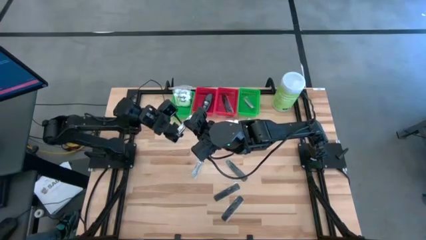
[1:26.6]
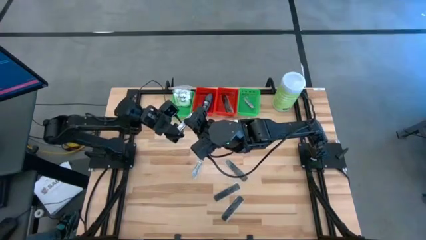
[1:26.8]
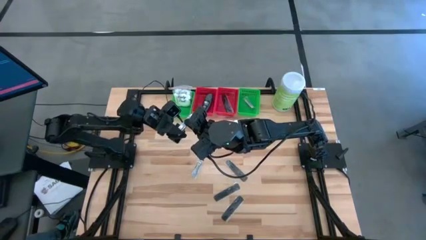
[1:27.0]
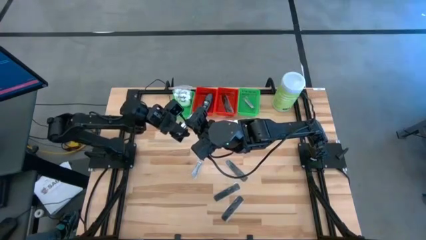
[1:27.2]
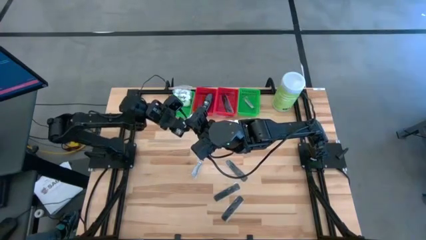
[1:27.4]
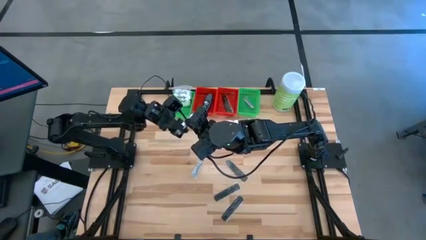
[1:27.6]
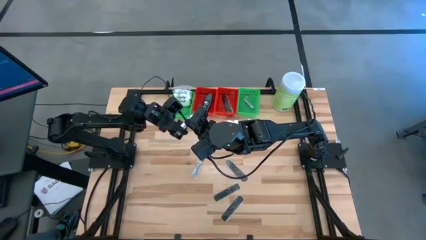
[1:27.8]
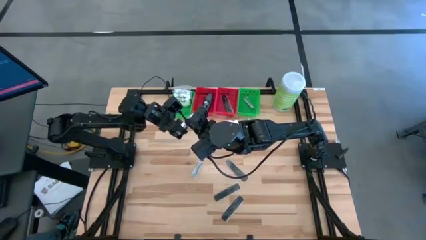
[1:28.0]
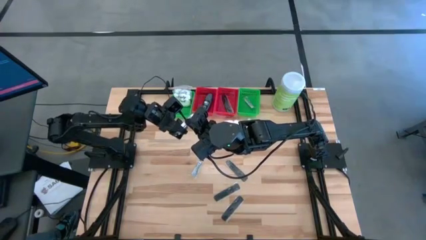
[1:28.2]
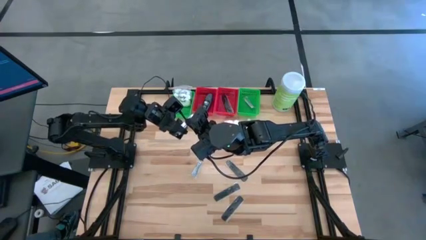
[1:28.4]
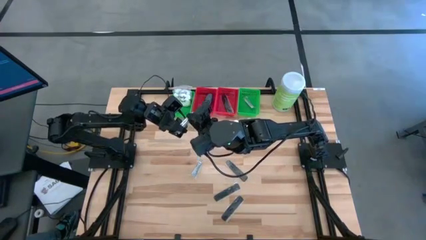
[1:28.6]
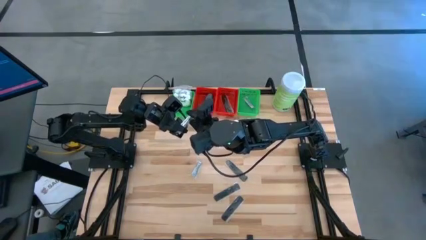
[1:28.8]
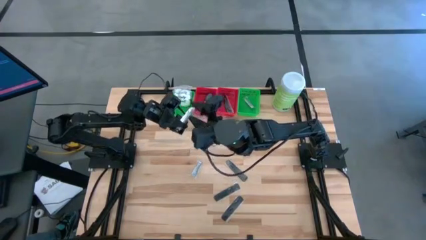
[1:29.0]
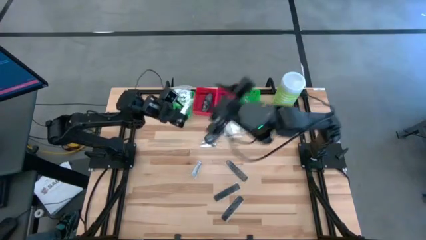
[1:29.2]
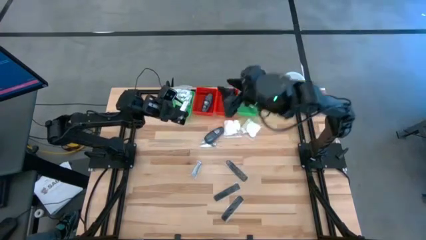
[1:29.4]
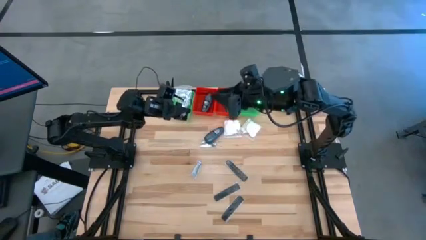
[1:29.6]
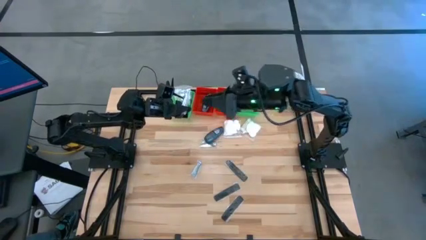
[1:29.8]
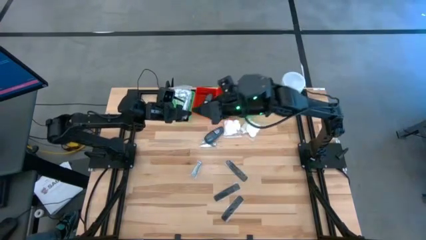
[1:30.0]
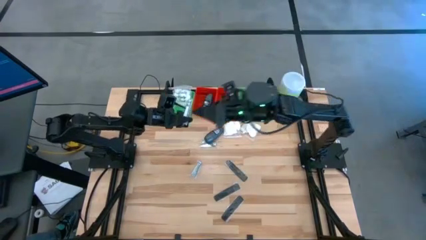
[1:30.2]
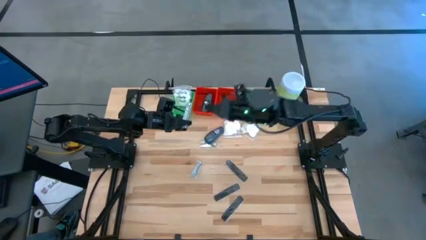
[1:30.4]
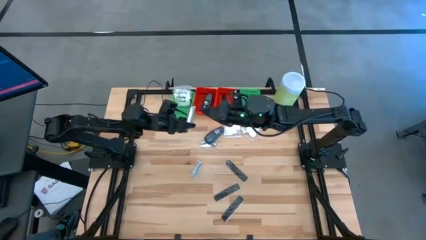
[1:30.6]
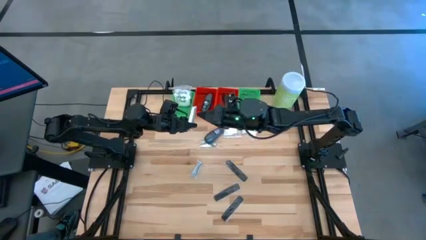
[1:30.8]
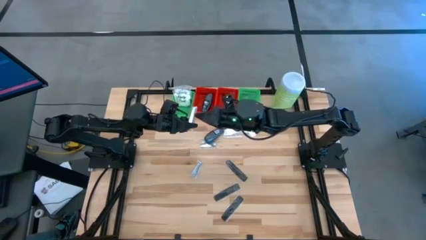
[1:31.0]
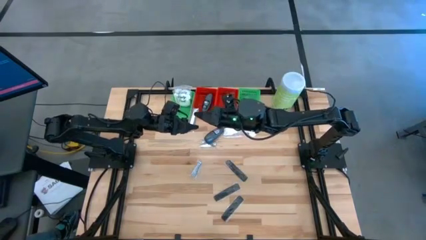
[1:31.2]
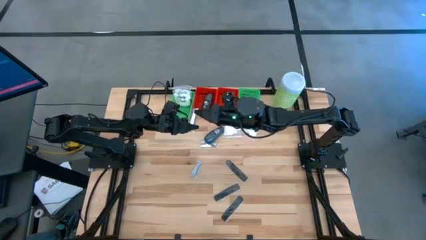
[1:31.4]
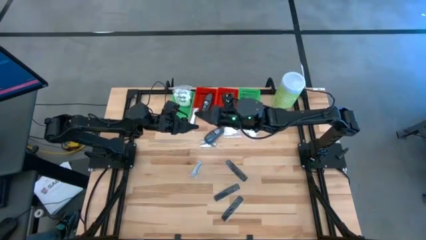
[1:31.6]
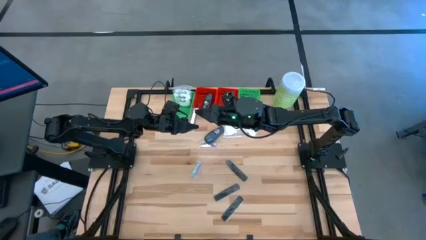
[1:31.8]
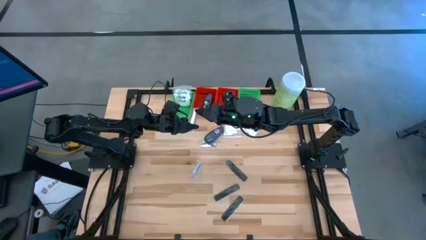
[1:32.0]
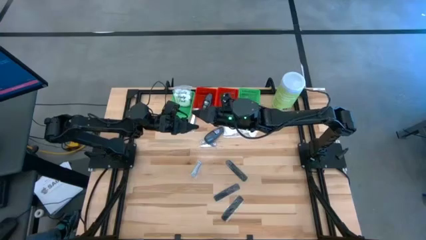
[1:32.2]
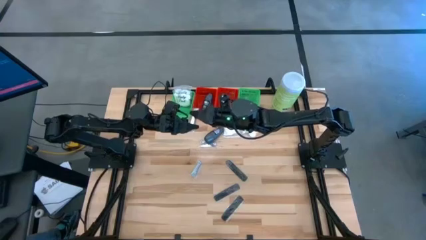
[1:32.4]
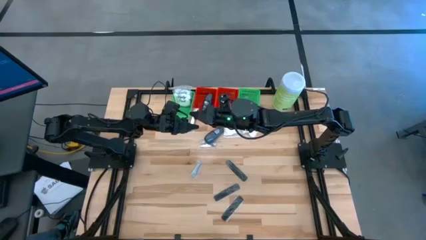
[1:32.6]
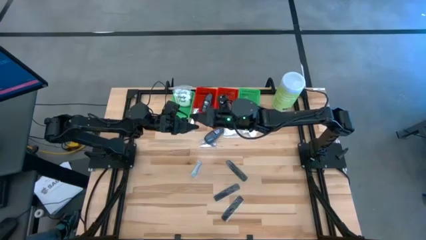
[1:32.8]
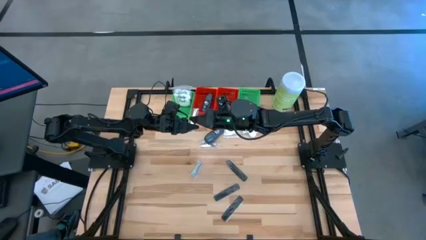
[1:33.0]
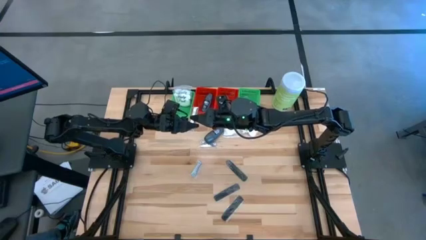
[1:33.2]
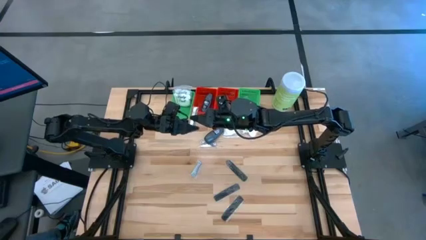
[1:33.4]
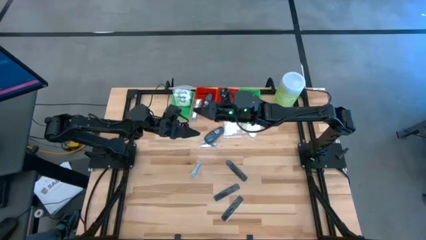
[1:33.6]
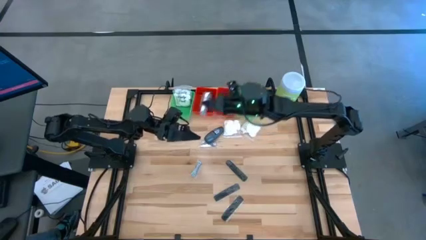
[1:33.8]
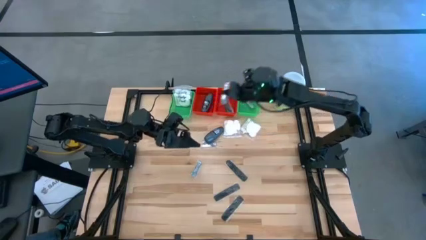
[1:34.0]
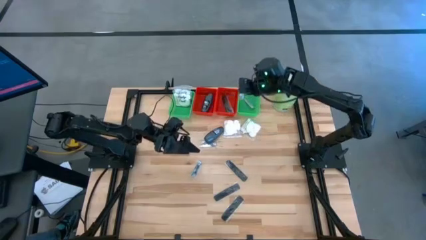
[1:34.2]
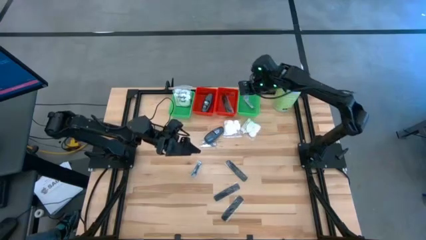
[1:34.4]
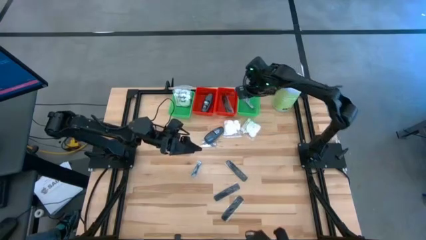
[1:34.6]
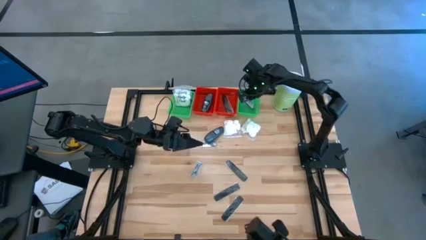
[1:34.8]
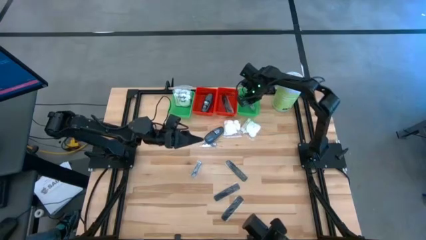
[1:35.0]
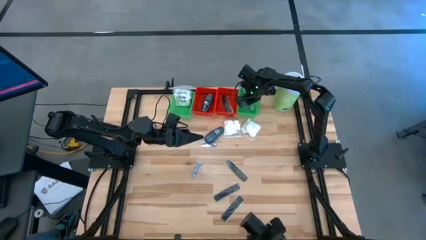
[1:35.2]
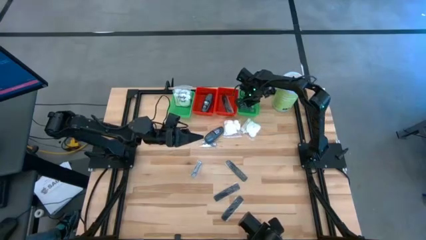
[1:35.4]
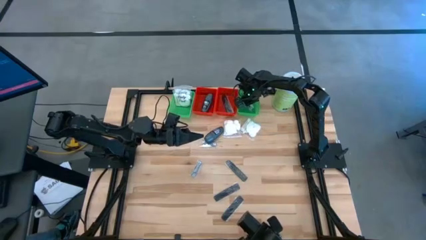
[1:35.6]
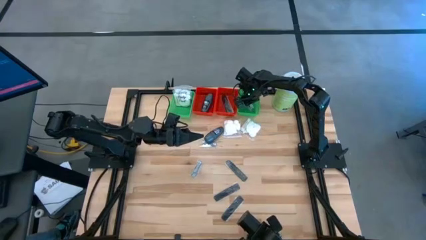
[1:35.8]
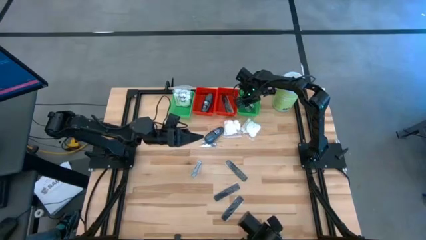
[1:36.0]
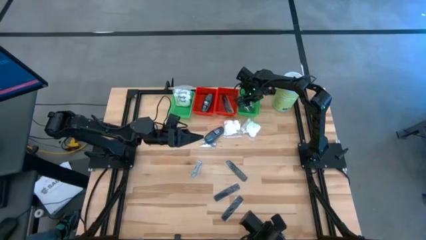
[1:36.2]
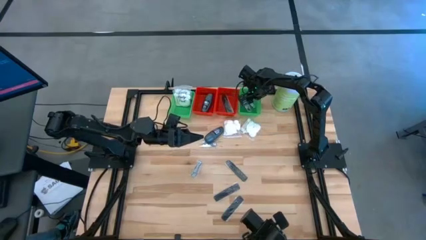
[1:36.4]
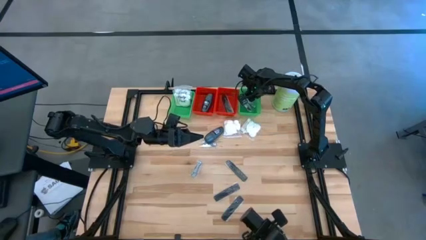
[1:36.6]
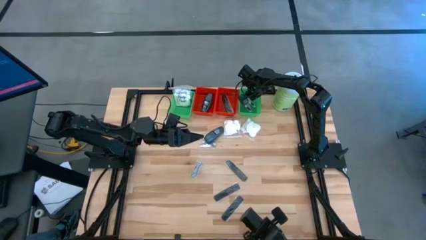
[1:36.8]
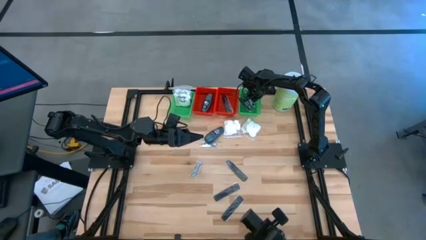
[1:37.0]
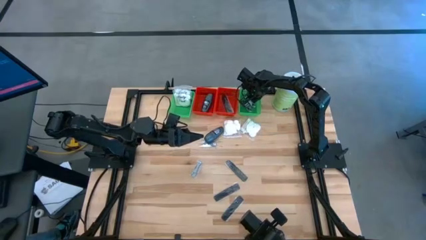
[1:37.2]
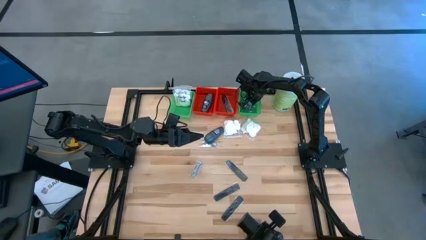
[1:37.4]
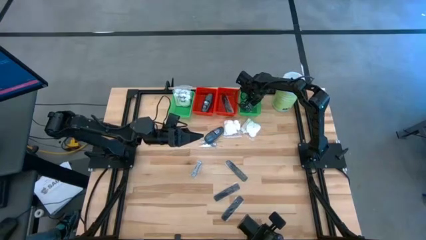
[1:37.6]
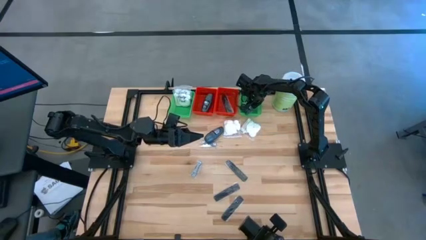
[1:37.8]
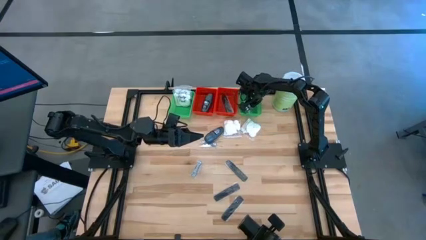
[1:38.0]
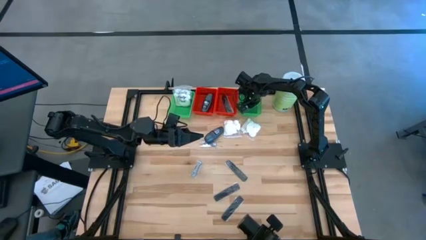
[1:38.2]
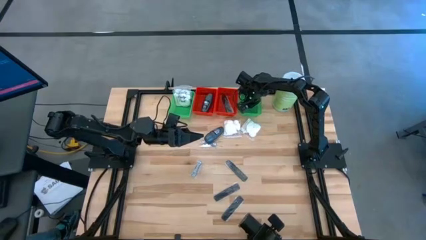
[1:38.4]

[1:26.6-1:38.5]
Task: Pick & Place Travel size toiletries
Put the nail cutter into the right green basket

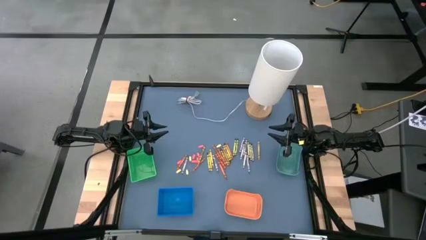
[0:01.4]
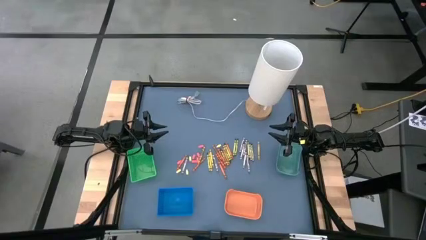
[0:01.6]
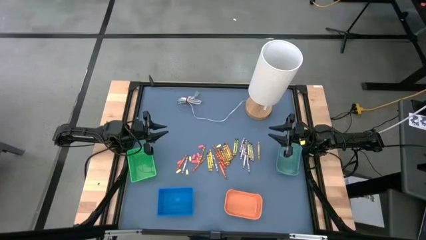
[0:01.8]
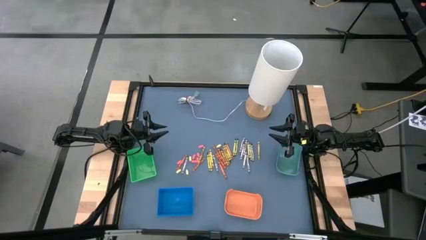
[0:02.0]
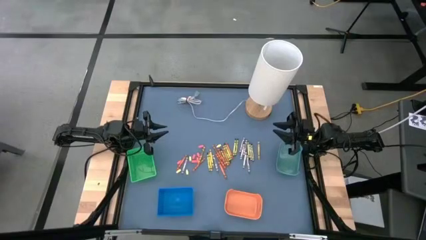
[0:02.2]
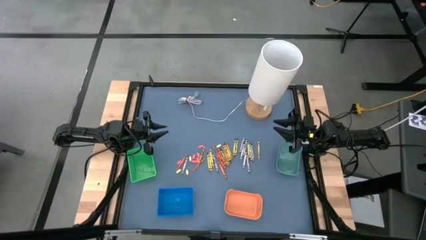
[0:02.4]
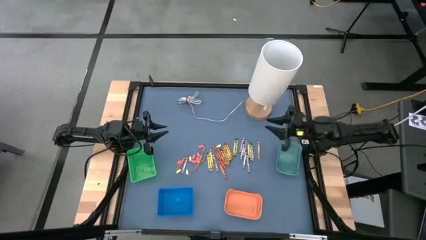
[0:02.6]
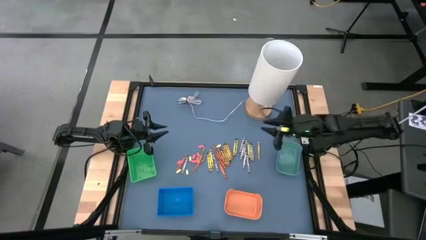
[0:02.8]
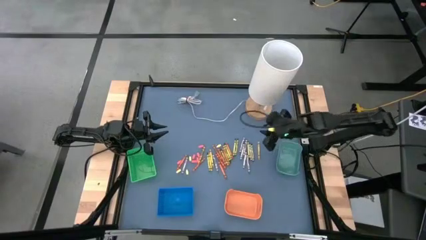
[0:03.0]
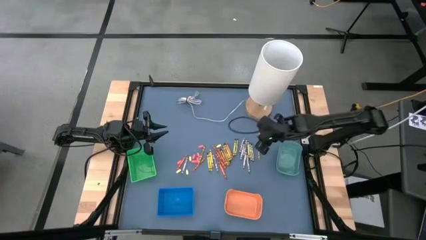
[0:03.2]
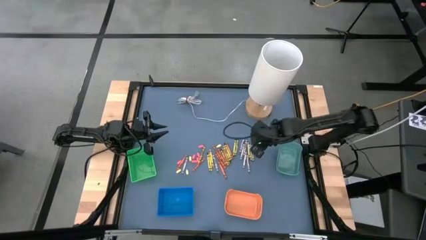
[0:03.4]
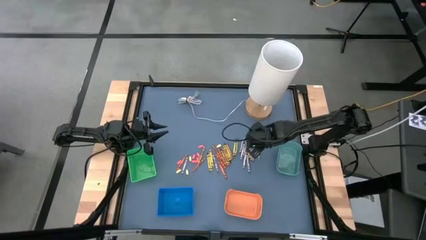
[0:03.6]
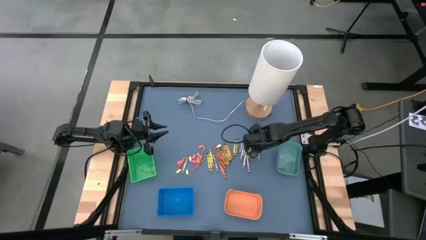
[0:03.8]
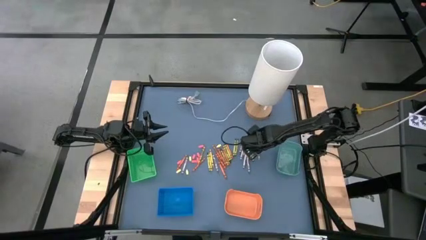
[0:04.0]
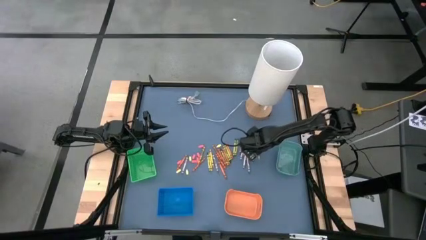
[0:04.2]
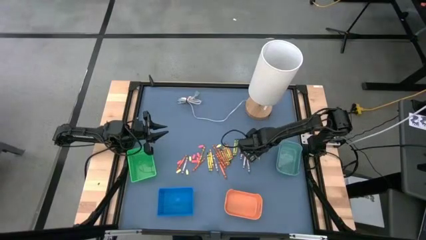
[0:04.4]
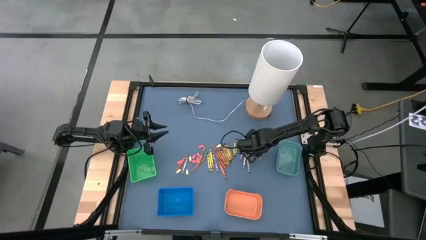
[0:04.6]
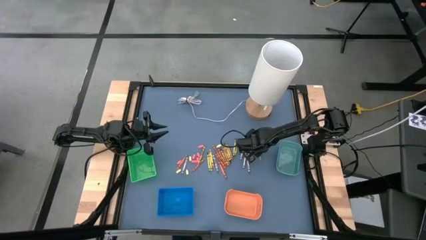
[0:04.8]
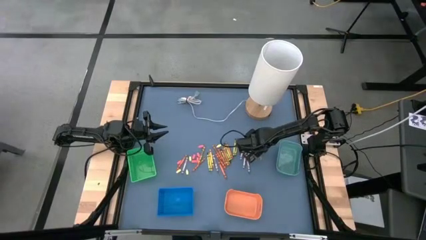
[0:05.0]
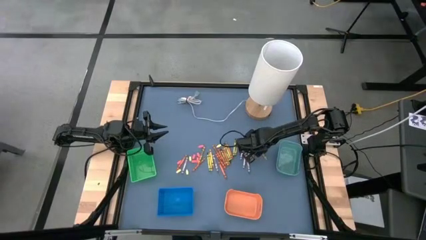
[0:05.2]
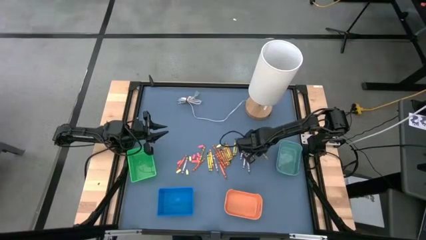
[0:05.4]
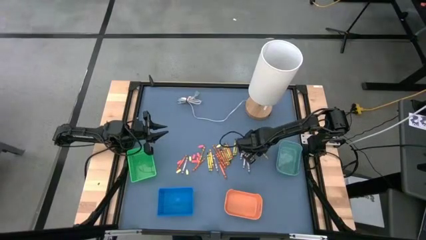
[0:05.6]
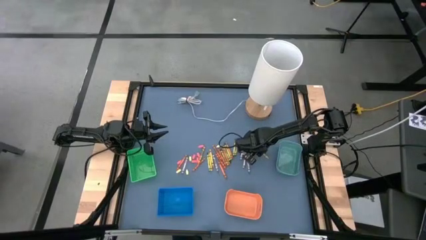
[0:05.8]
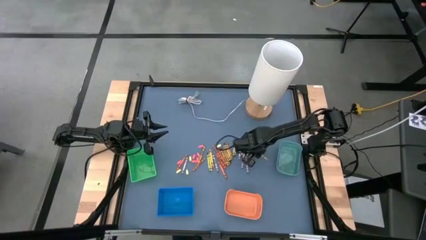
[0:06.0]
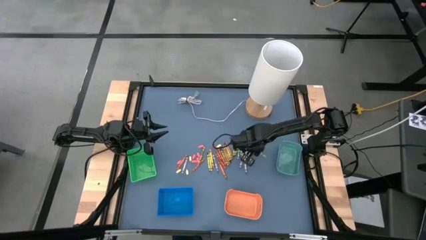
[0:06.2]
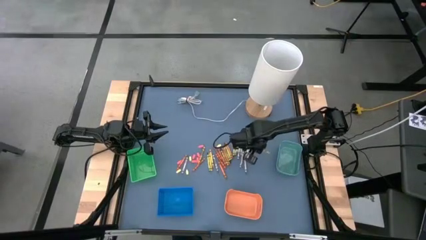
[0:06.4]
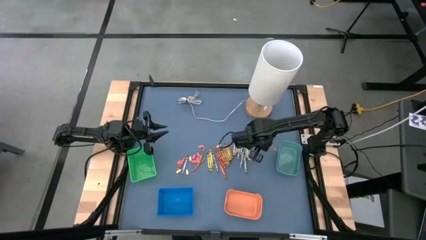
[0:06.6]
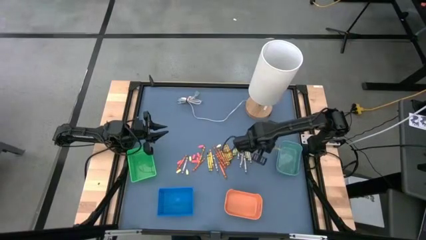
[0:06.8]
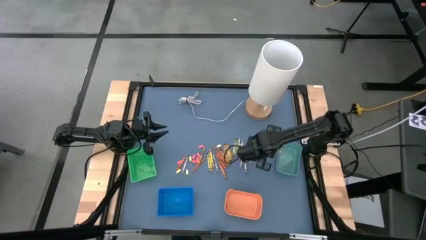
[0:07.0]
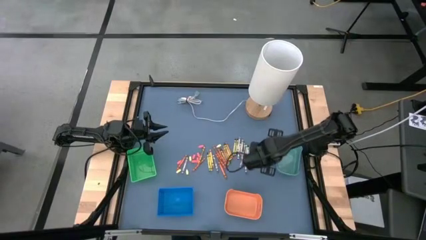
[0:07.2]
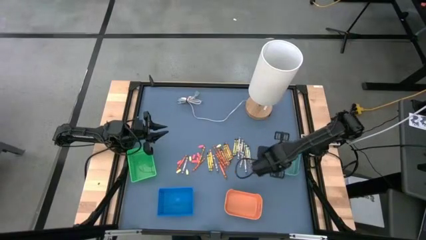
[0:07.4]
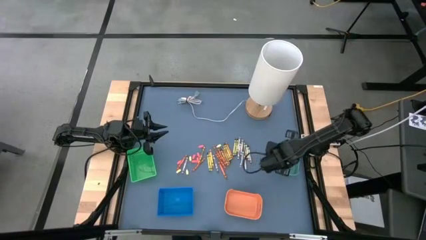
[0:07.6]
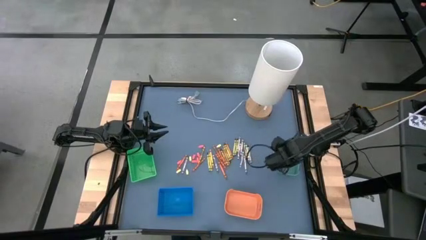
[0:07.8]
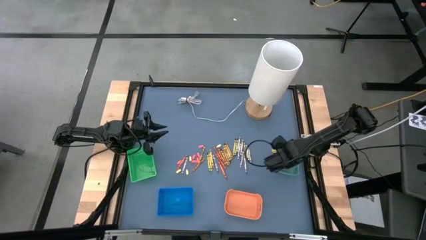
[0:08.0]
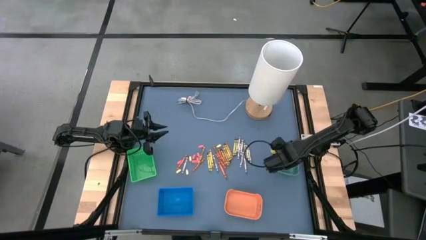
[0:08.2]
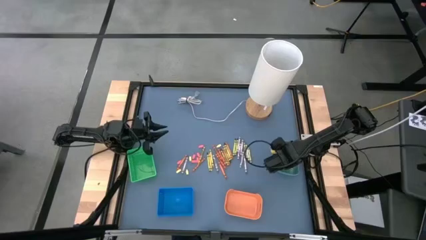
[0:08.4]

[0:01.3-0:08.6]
Task: Sort crayons
Put the yellow crayon into the dark green bin
